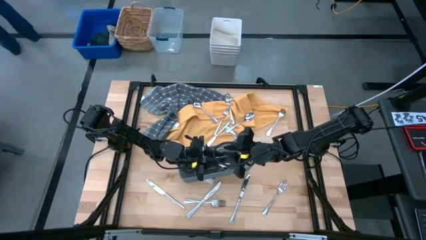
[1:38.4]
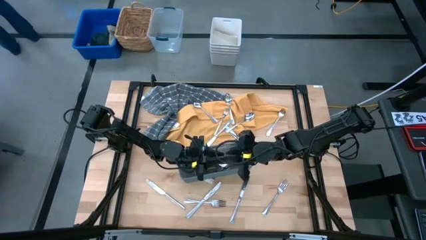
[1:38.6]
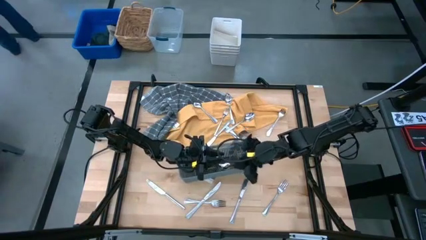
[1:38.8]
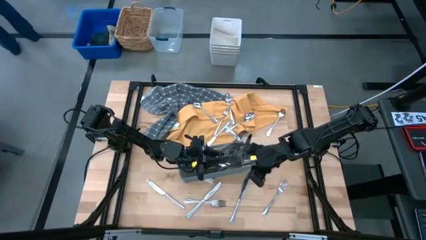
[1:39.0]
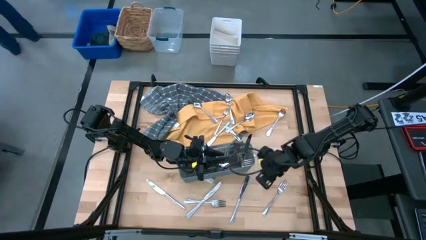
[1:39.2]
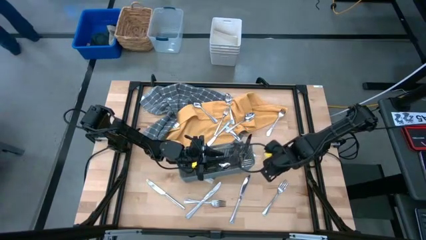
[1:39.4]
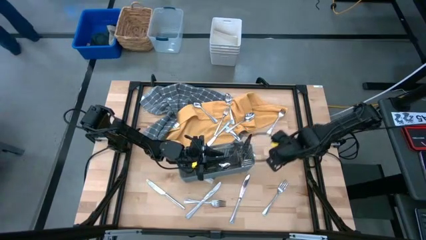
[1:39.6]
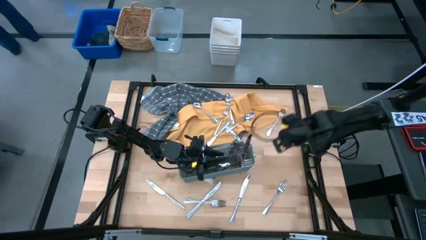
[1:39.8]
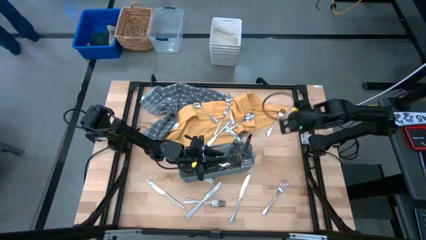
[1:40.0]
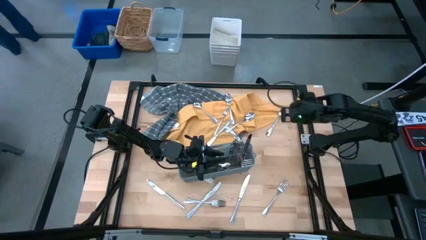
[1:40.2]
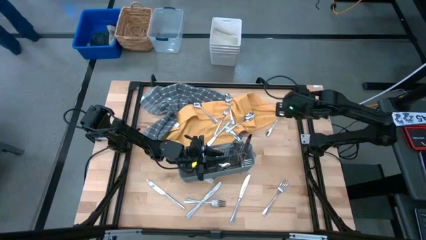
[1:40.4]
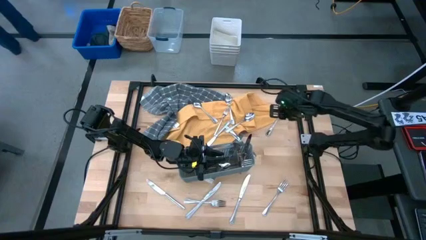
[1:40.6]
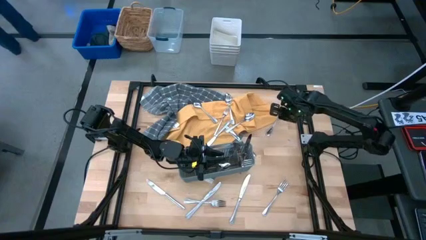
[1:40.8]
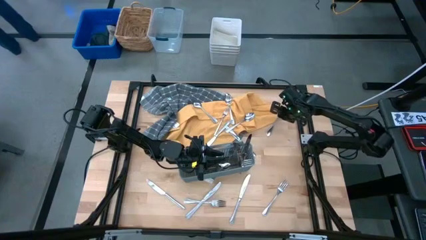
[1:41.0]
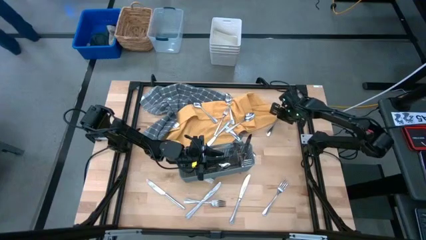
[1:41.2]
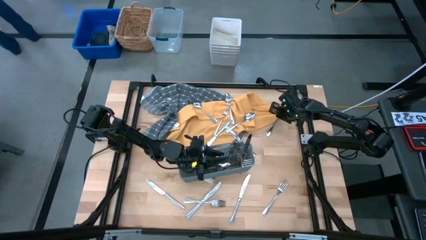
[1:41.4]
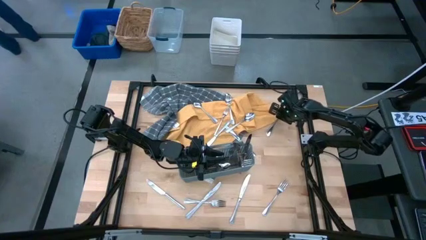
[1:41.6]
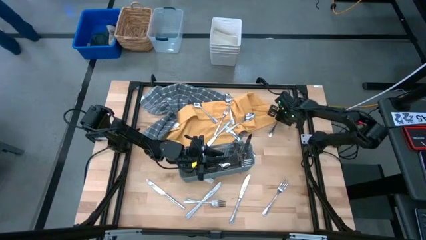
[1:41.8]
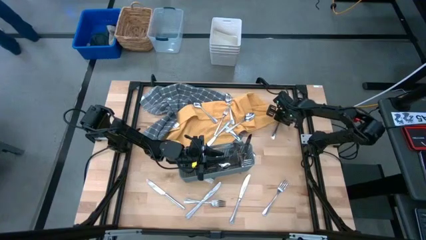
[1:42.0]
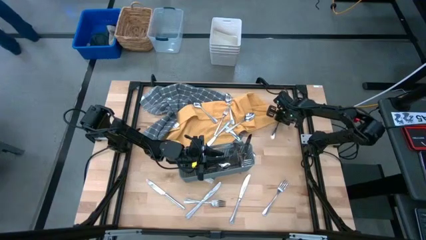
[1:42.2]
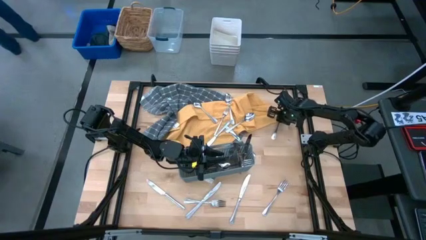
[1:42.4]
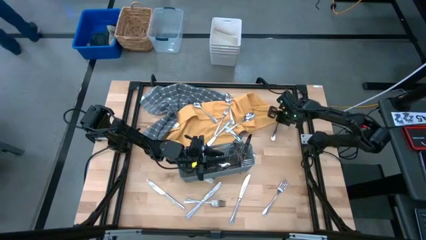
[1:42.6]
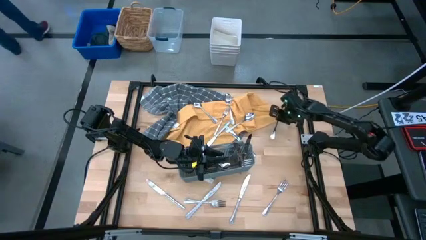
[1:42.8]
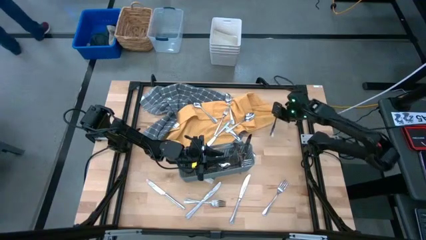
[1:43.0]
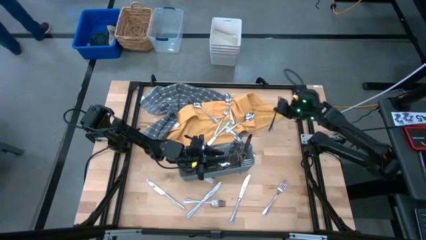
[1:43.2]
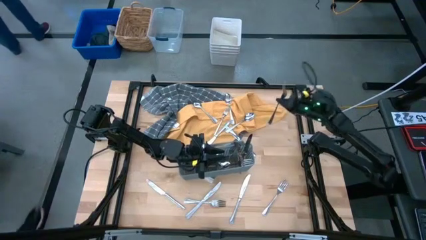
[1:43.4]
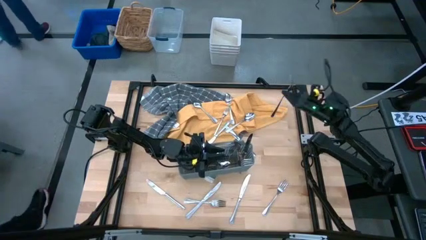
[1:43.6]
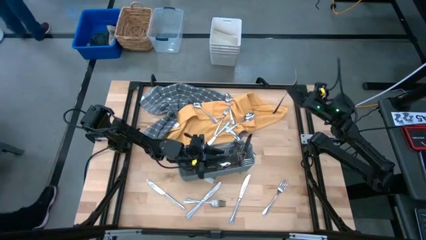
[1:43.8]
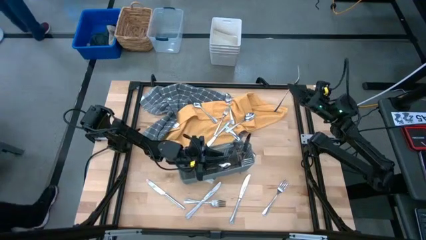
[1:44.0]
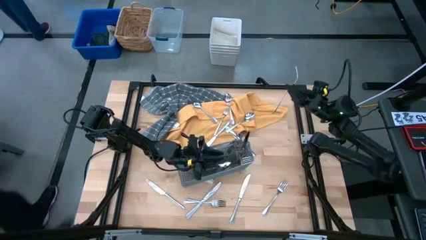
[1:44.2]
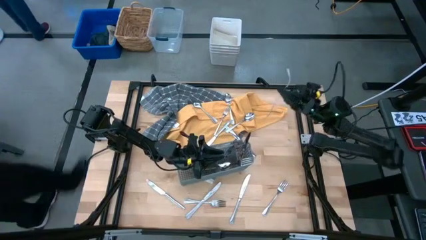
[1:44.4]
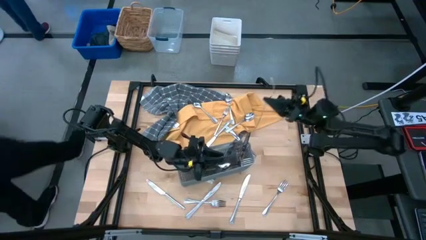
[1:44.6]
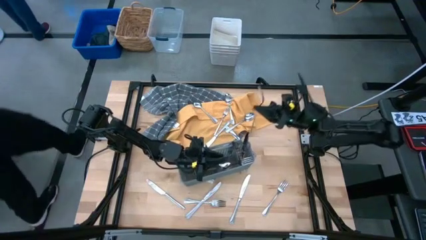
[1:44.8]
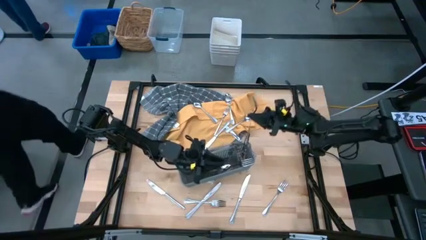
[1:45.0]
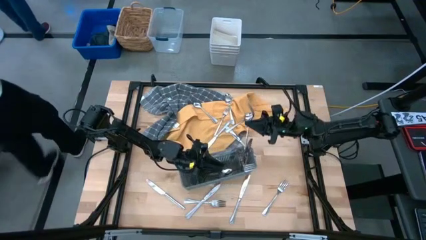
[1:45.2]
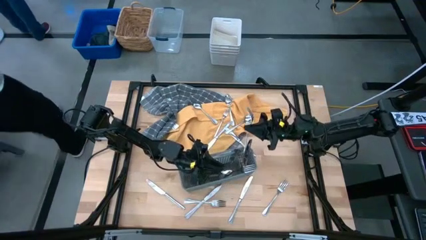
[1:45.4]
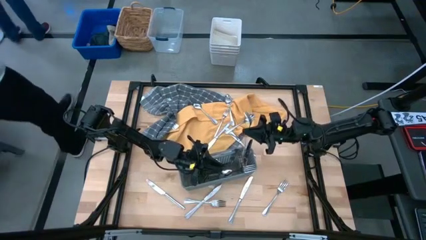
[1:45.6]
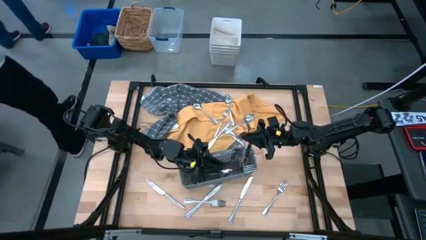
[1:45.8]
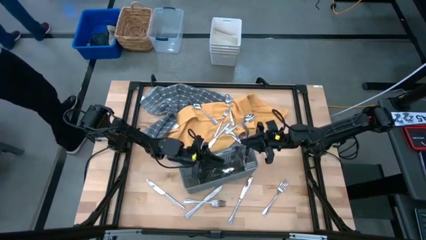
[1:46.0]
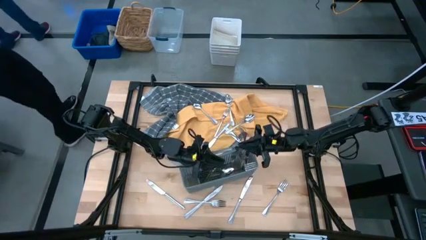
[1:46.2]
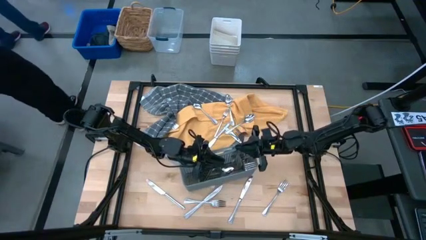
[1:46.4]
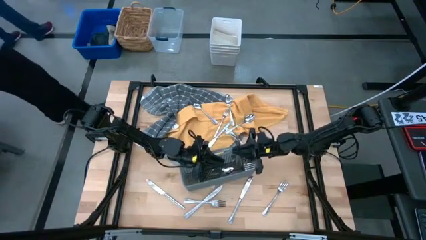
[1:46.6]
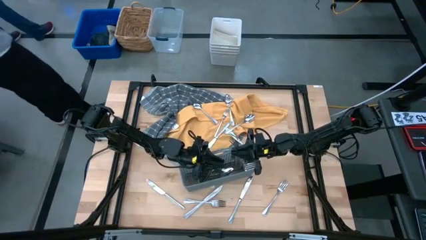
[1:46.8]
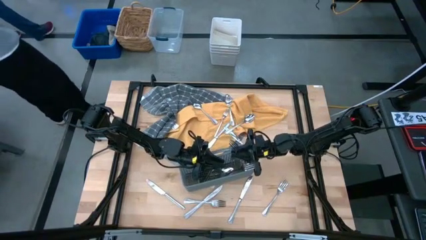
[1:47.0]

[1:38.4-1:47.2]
Task: Sort silverware
Put the silver fork into the gray silverware basket

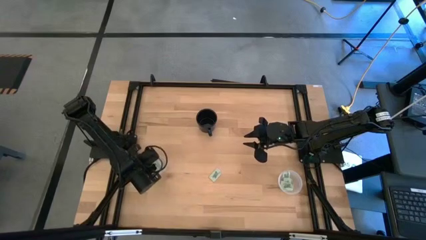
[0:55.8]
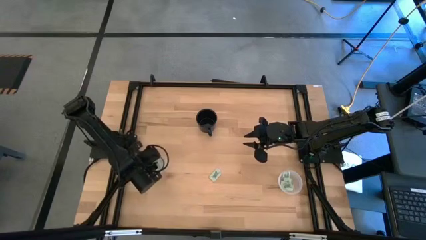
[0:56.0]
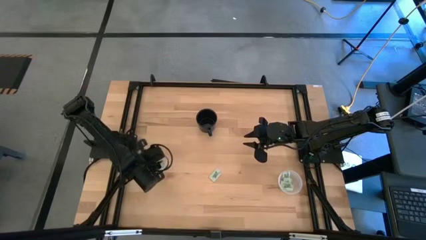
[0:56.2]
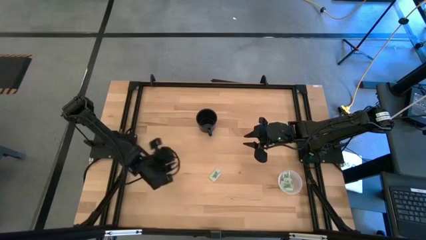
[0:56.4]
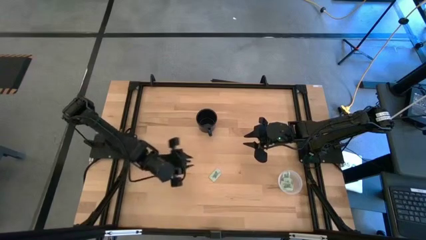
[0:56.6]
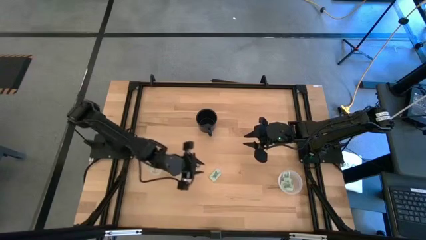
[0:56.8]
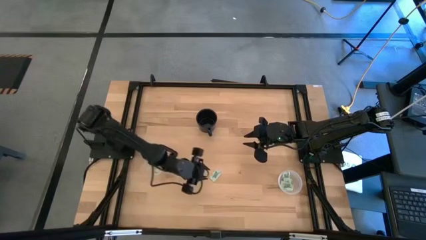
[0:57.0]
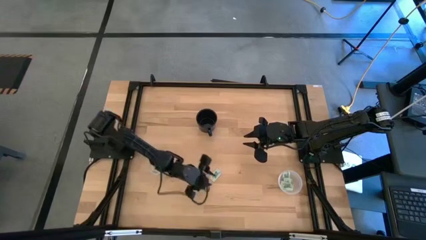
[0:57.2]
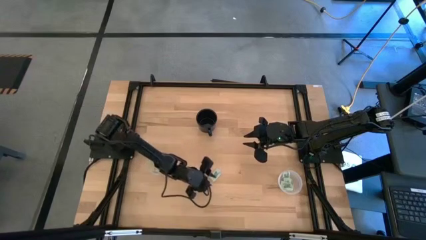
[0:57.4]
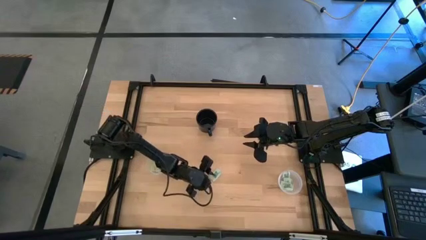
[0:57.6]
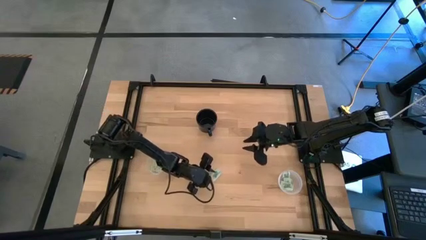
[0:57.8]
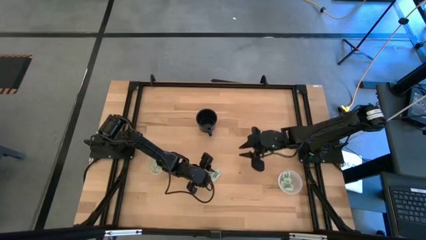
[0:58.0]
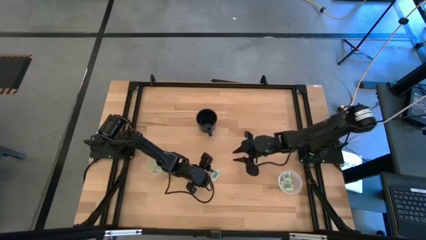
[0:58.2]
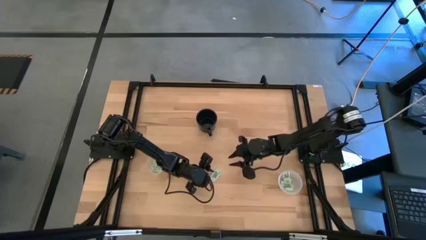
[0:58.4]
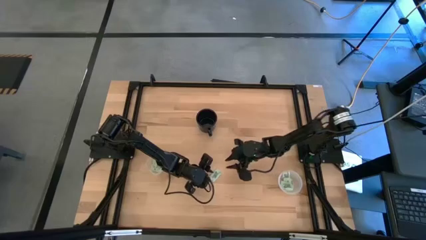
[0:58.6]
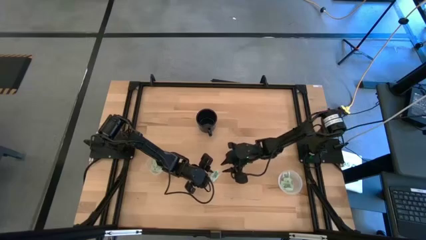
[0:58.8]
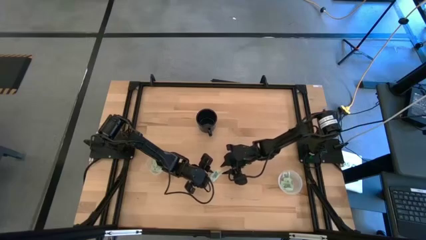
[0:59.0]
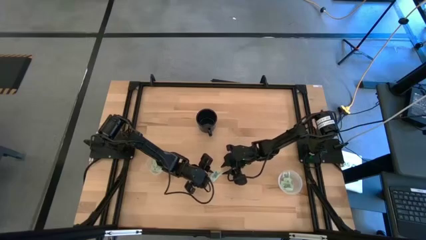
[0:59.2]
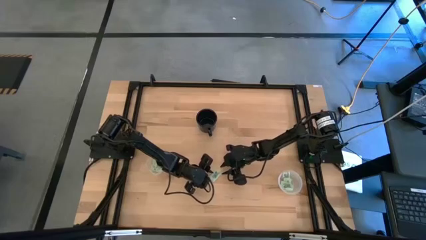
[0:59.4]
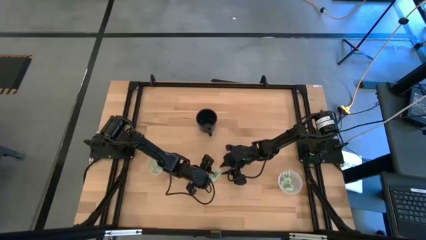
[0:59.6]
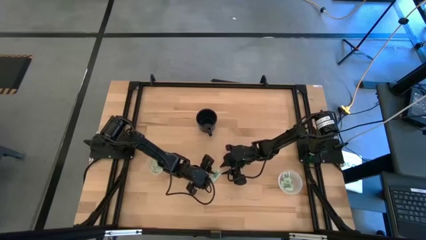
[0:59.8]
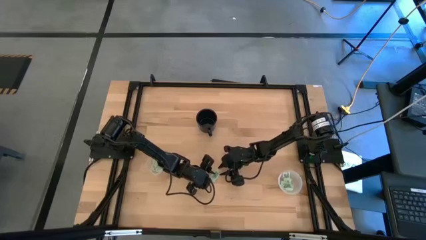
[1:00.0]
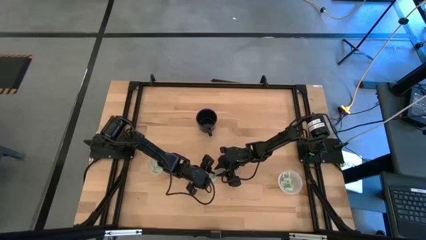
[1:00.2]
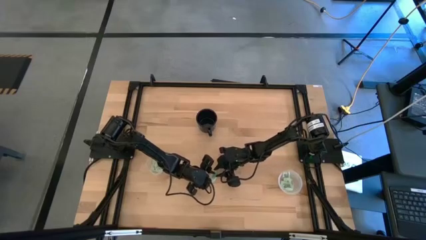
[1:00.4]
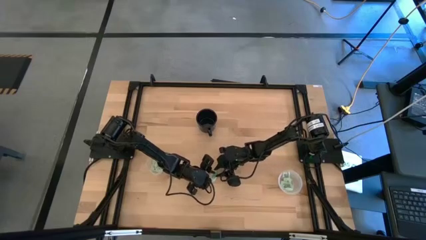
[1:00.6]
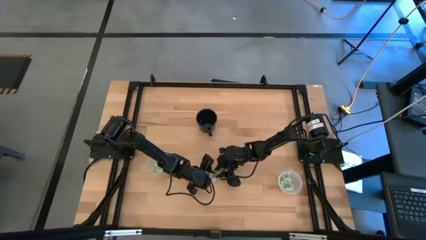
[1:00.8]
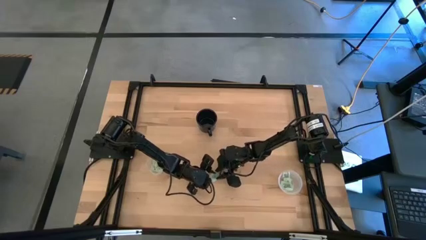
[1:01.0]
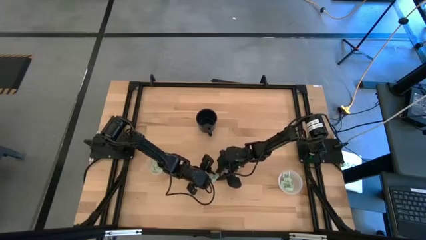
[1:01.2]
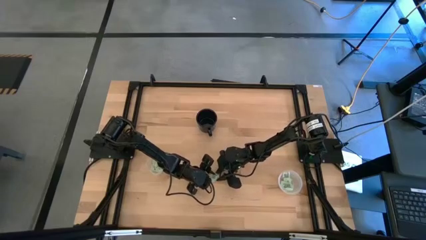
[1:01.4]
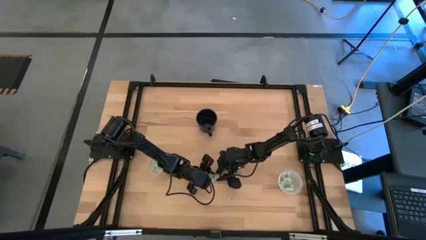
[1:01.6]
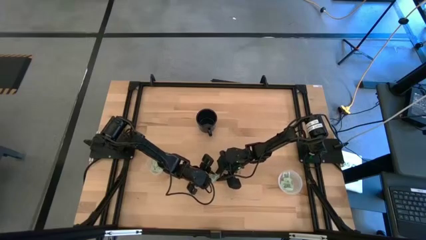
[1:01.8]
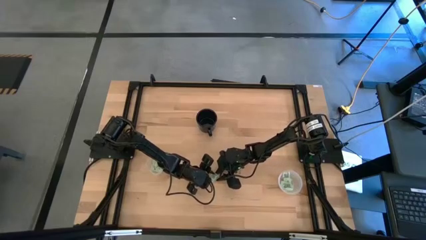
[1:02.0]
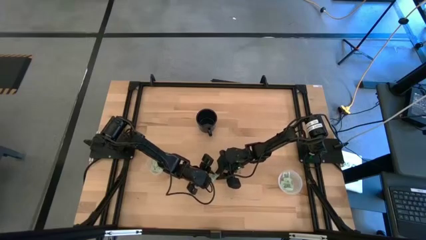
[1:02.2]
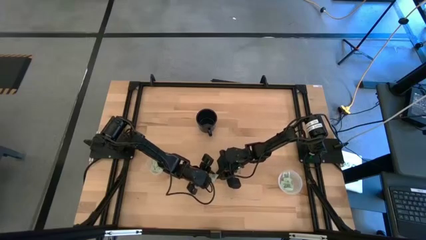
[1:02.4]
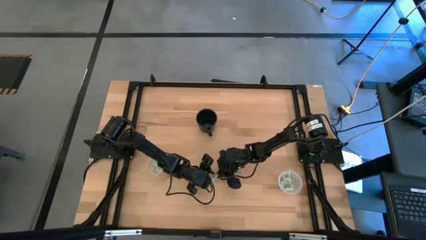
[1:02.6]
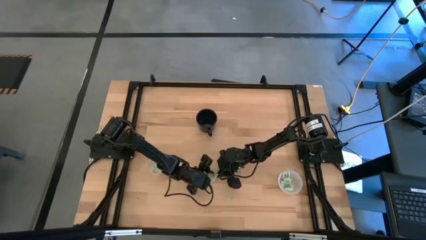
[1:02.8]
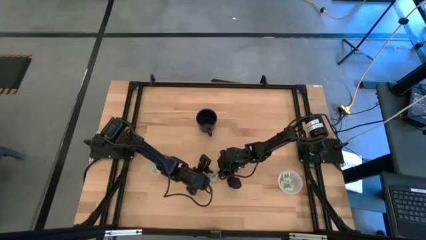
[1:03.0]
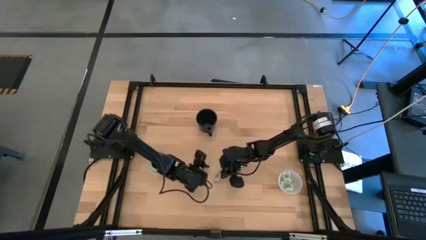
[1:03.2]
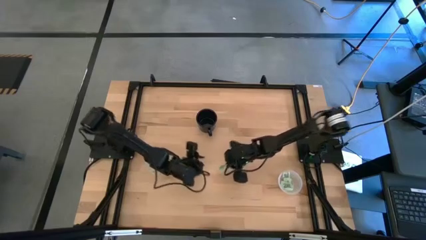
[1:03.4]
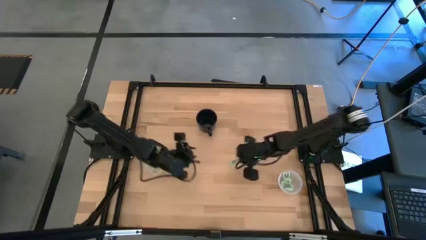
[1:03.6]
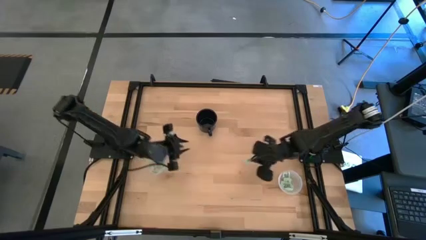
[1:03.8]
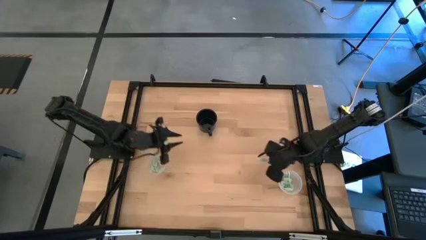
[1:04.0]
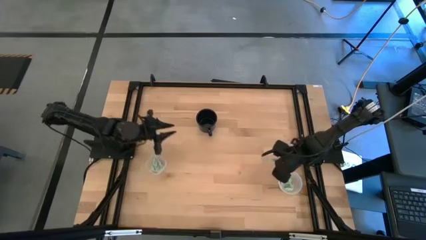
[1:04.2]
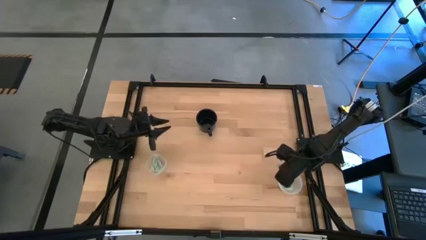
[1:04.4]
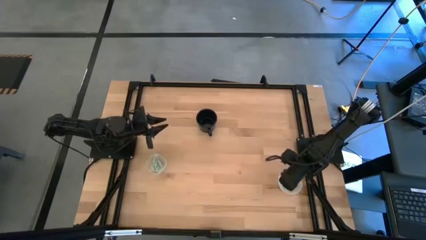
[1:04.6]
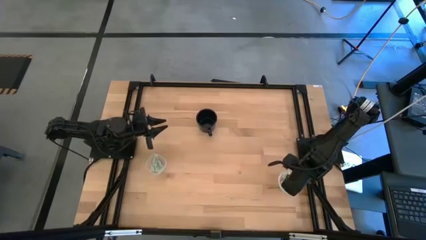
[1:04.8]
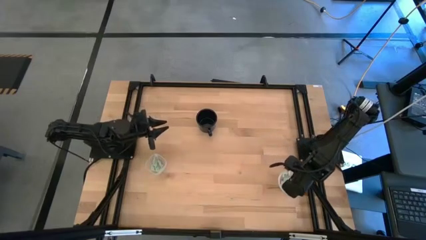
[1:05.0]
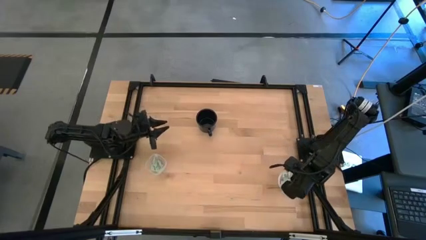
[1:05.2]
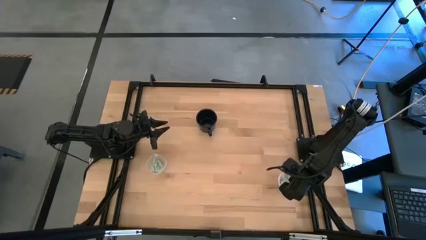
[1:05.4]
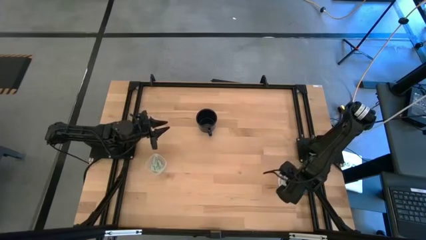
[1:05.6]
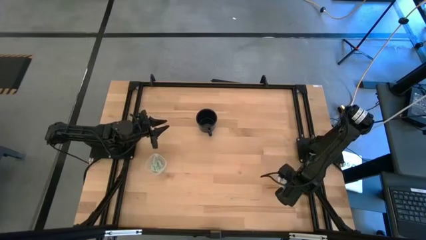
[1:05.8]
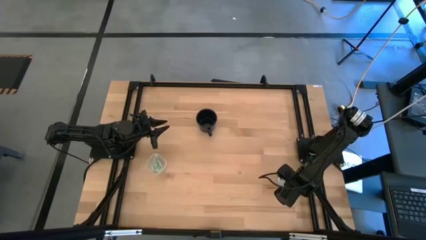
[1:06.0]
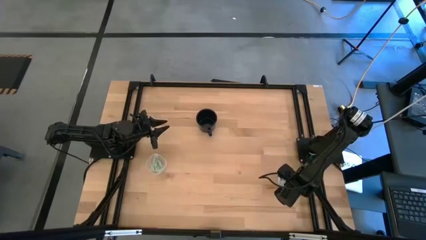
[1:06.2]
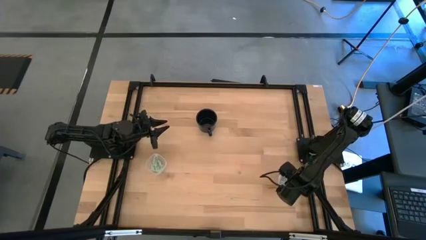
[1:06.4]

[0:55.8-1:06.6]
Task: Pick and place Stevia / Truvia into bins
Put the stevia packet into the right transparent container
